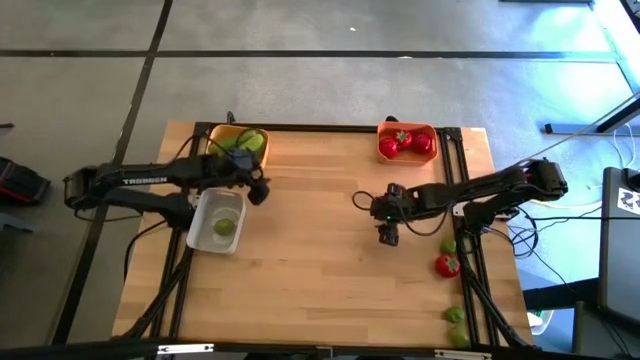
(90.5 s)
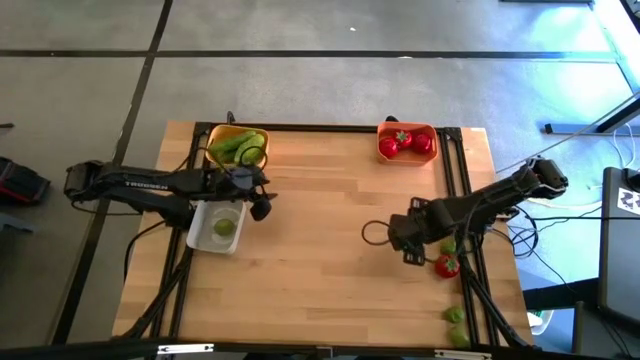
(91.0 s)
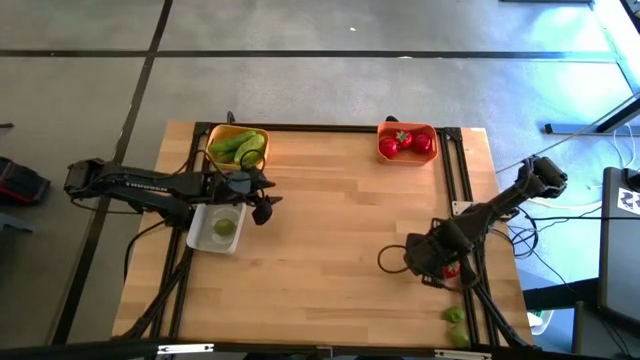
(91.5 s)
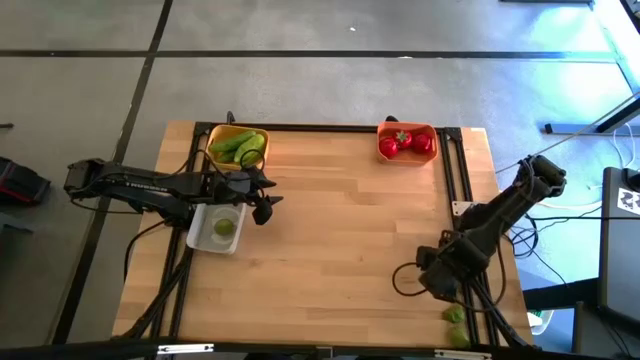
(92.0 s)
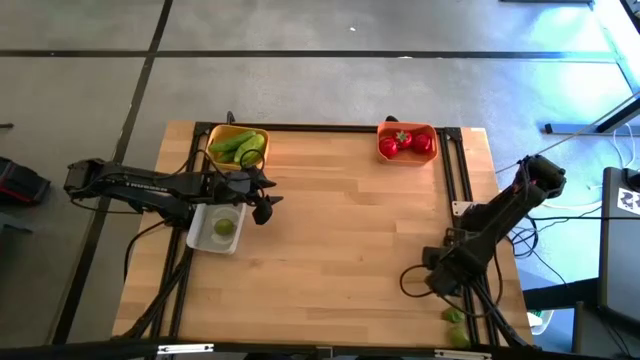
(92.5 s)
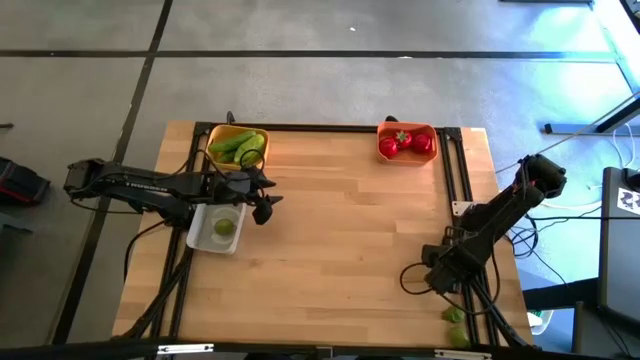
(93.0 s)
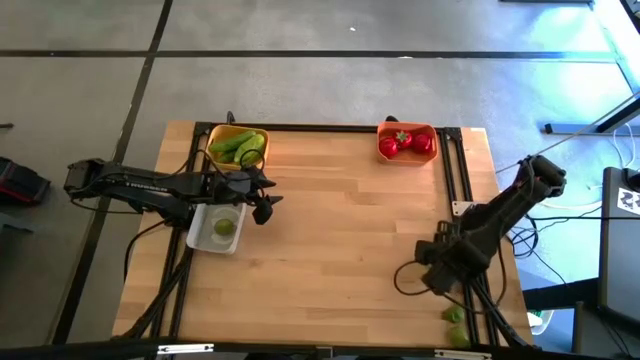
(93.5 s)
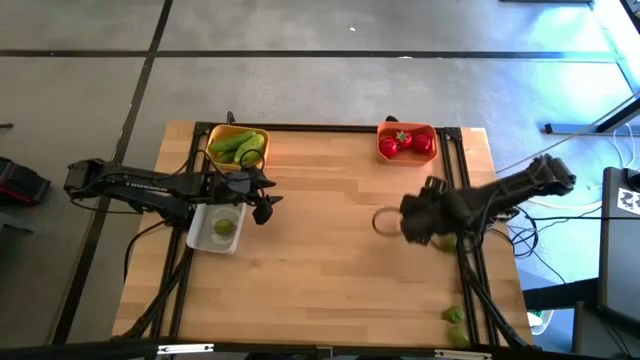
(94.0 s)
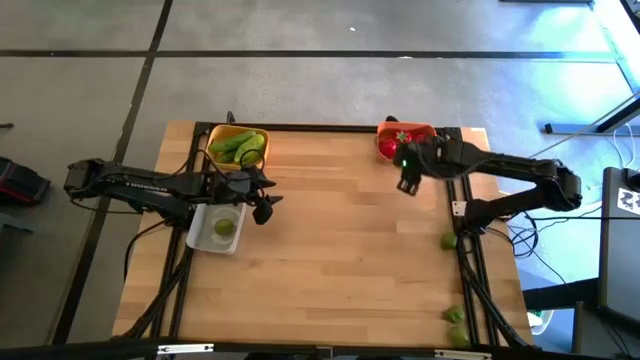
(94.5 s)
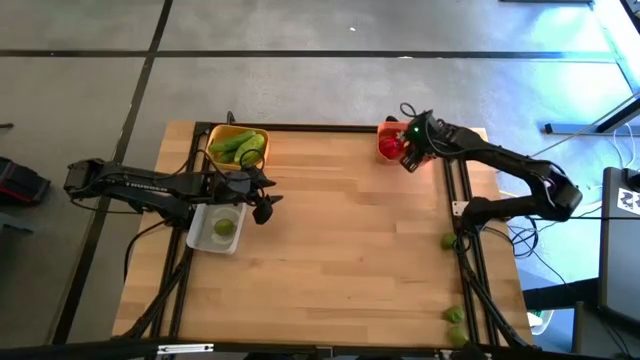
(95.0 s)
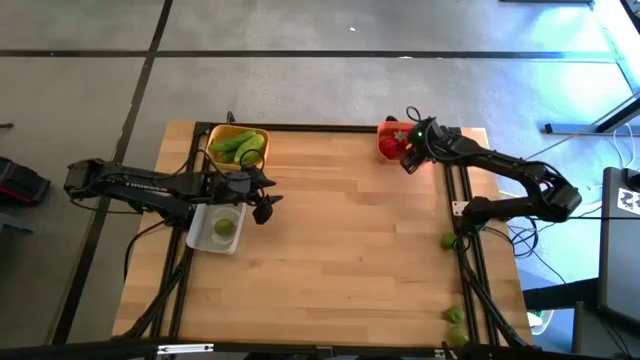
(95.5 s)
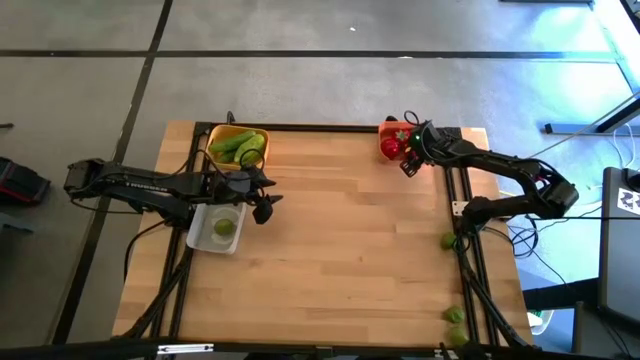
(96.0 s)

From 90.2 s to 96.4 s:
Task: Sort produce into baskets
Put the red tomato into the orange bin

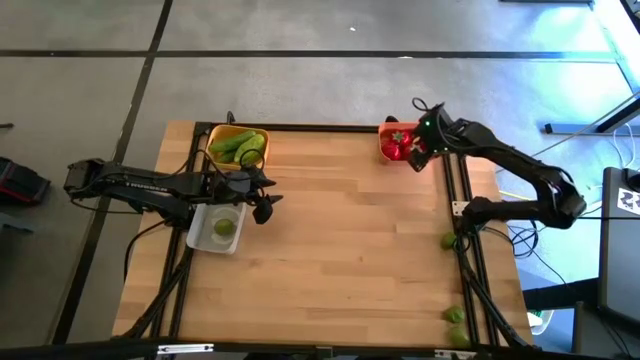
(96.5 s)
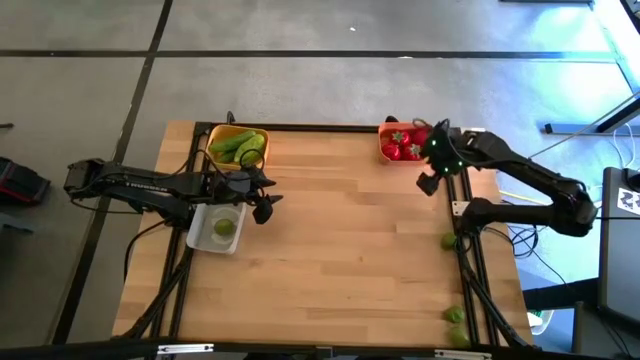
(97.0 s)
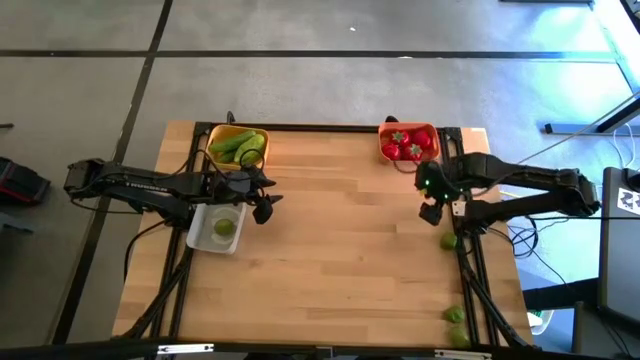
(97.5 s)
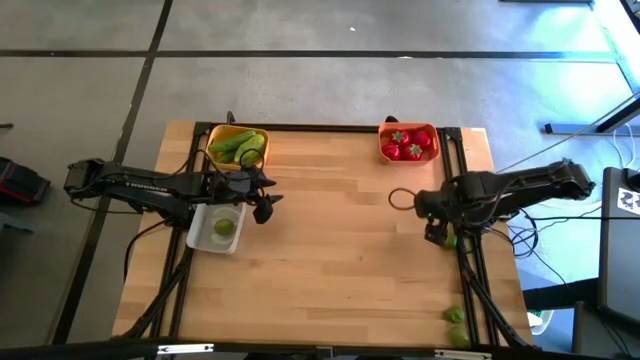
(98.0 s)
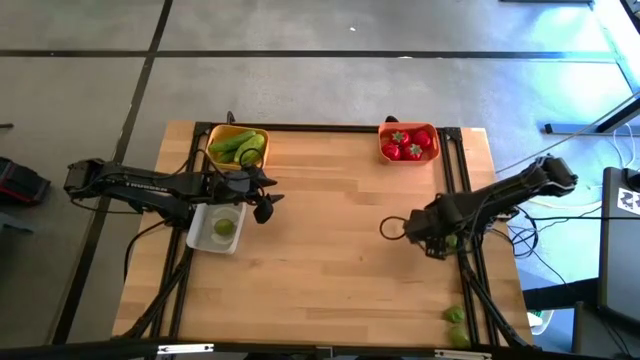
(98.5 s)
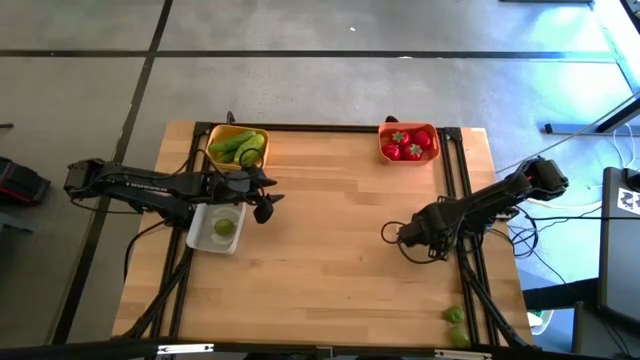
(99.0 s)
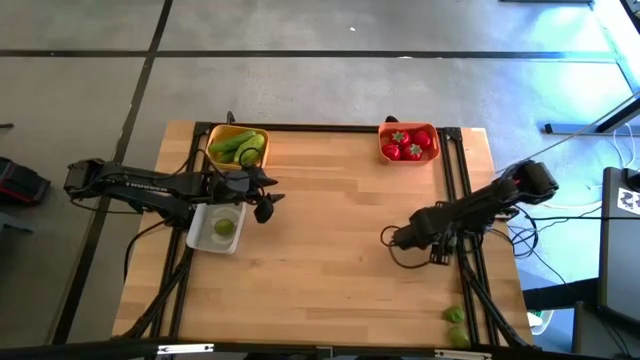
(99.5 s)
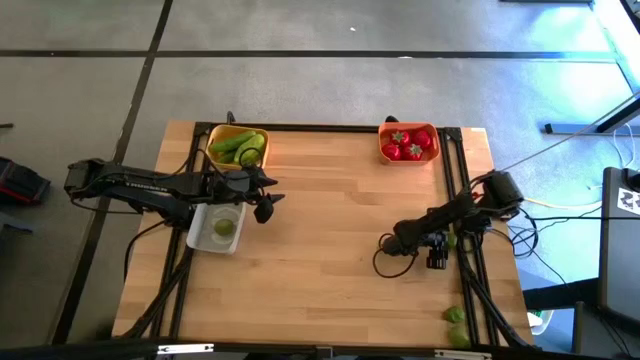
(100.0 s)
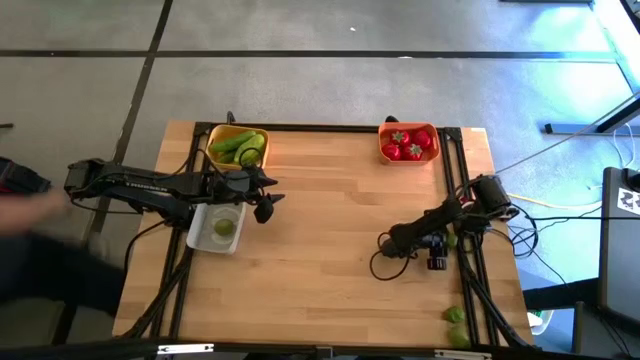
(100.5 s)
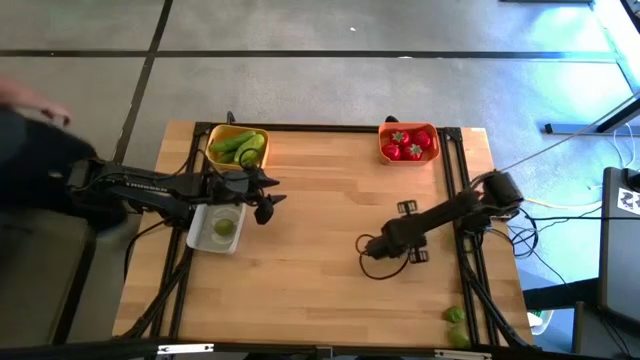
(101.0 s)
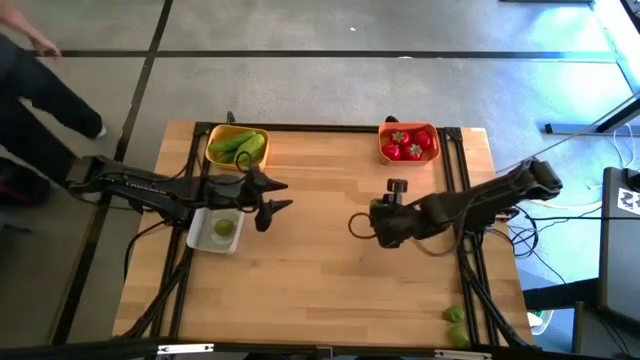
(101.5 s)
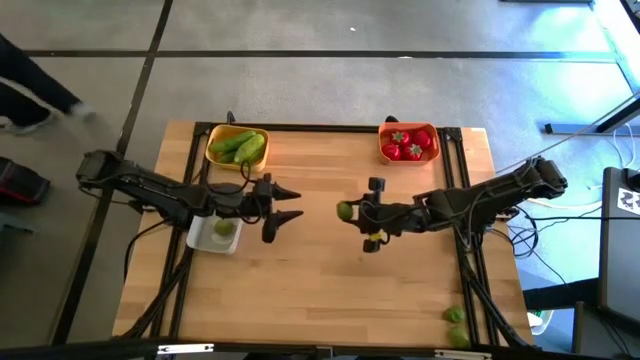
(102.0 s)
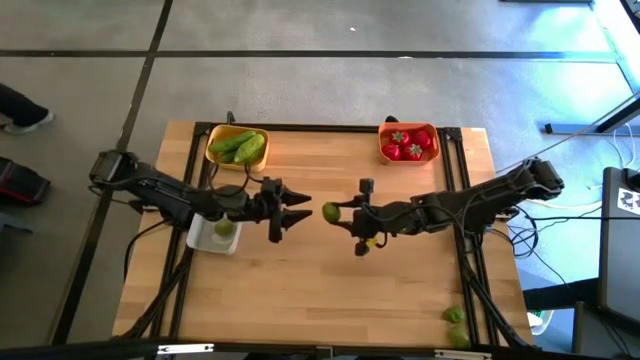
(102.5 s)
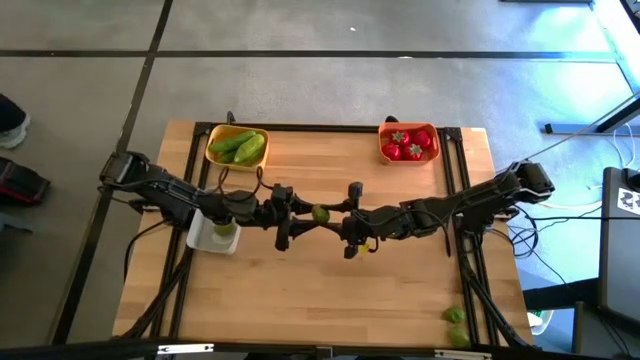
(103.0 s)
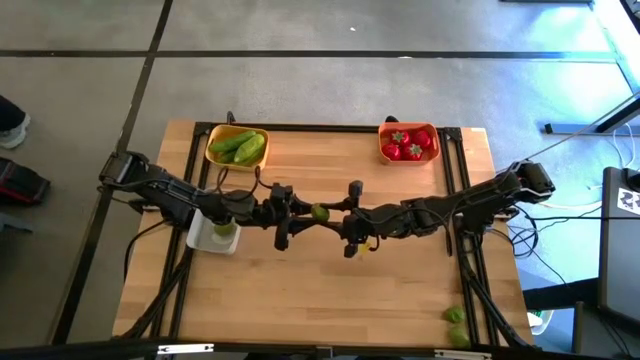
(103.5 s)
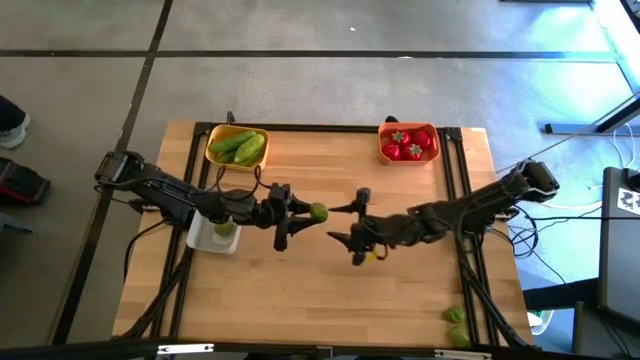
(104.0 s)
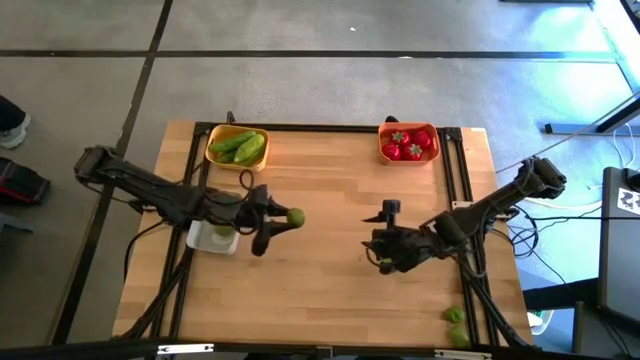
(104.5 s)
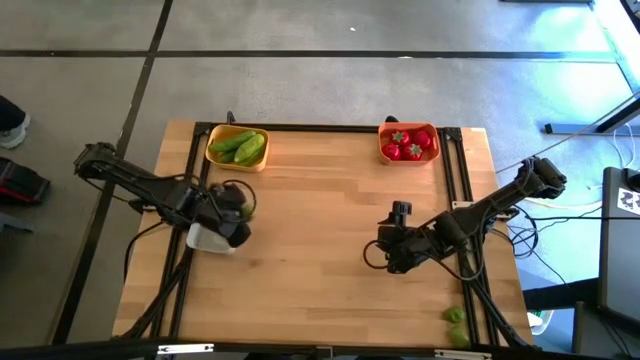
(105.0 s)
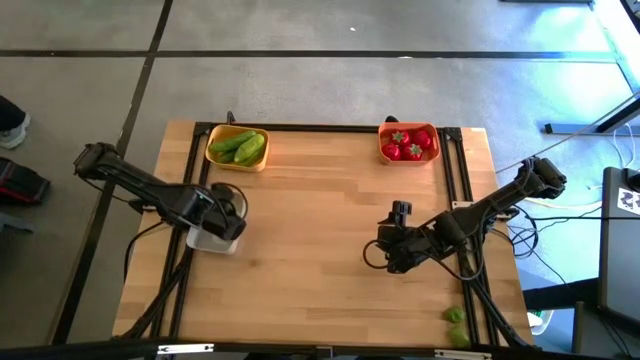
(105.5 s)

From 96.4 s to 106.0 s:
Put the top green lime into the white bin

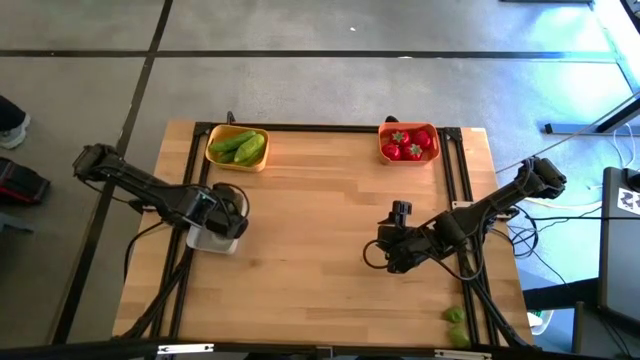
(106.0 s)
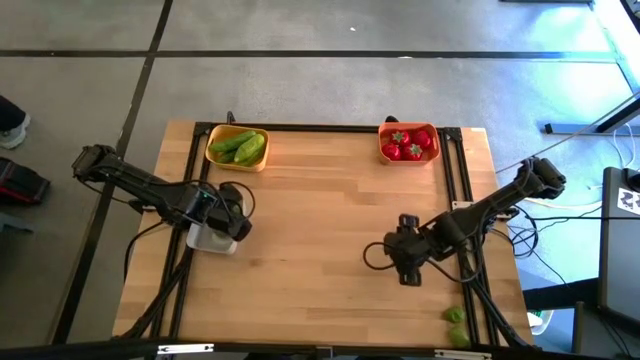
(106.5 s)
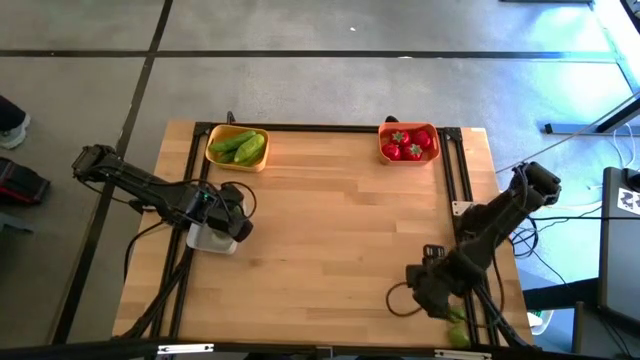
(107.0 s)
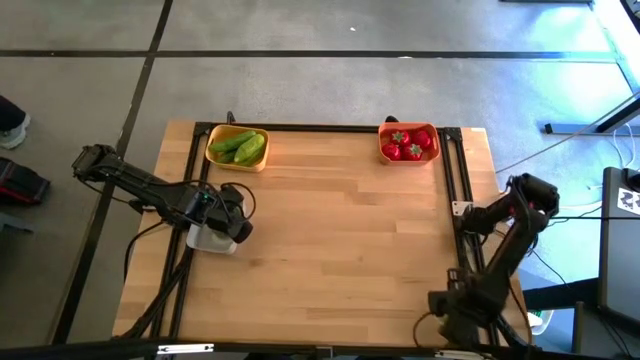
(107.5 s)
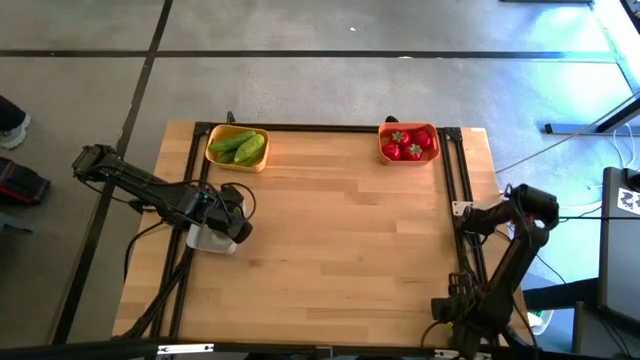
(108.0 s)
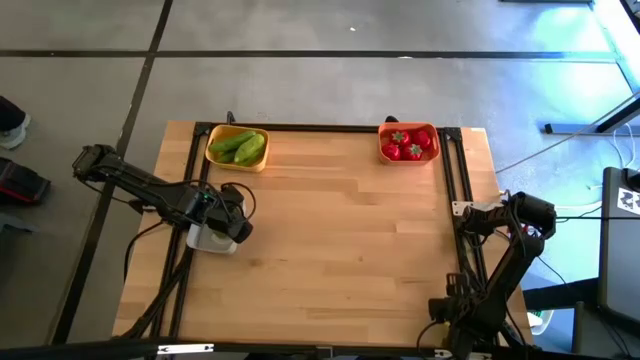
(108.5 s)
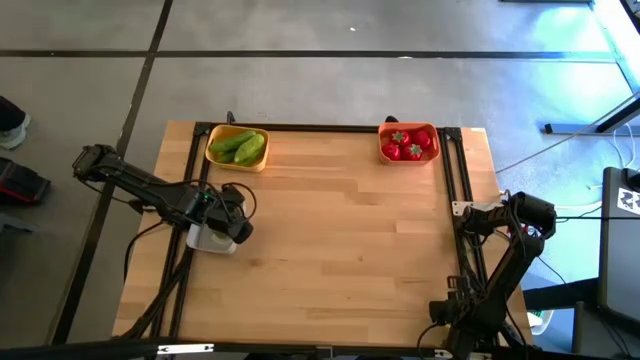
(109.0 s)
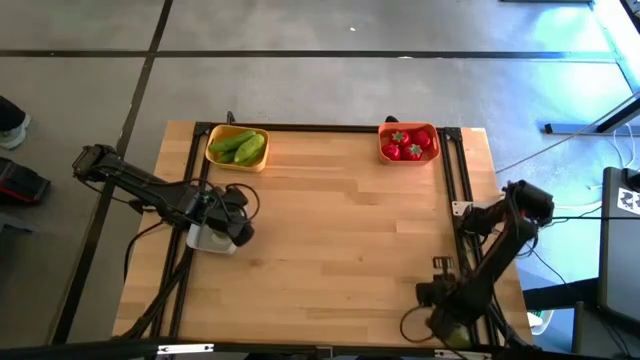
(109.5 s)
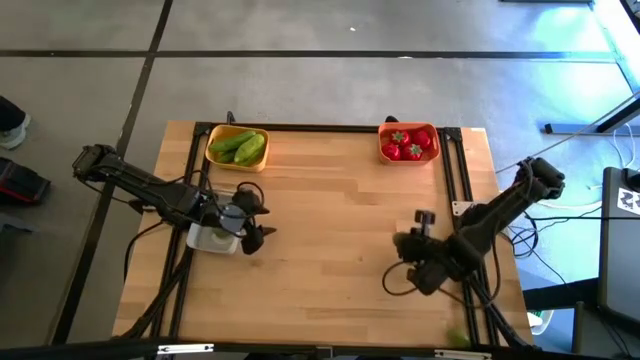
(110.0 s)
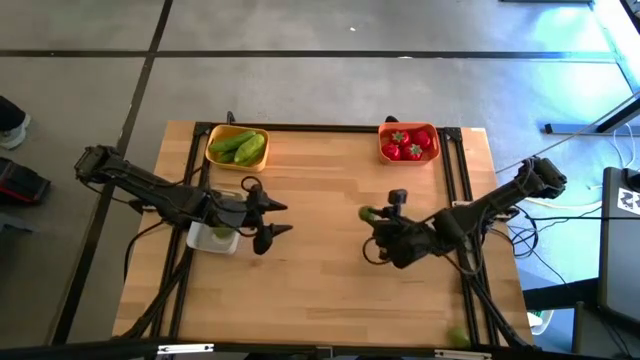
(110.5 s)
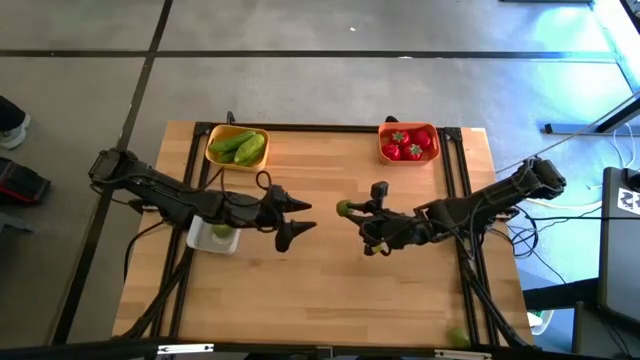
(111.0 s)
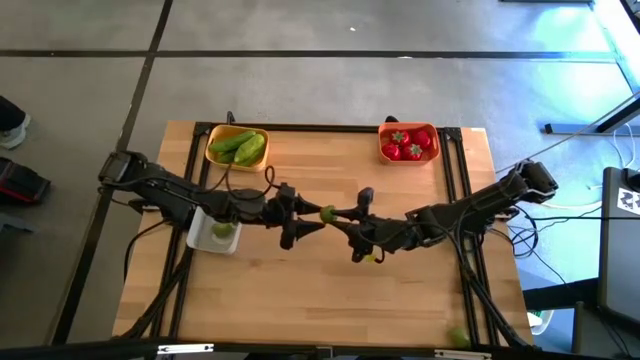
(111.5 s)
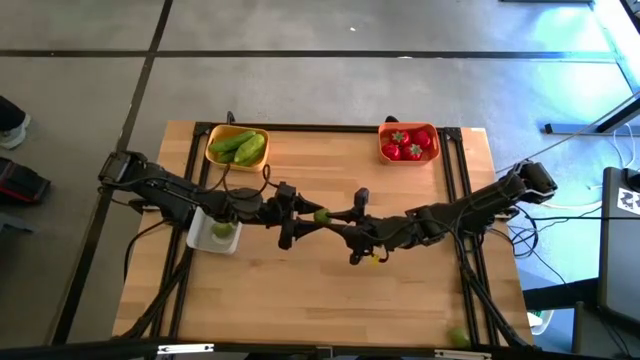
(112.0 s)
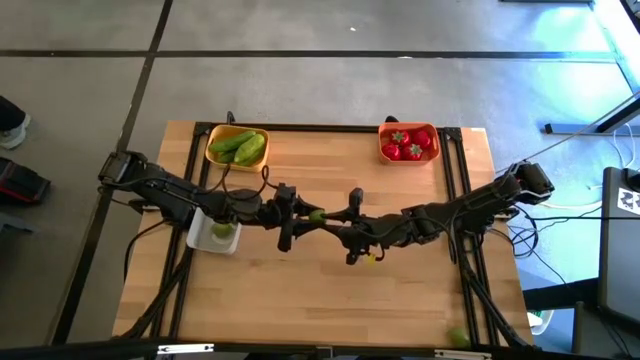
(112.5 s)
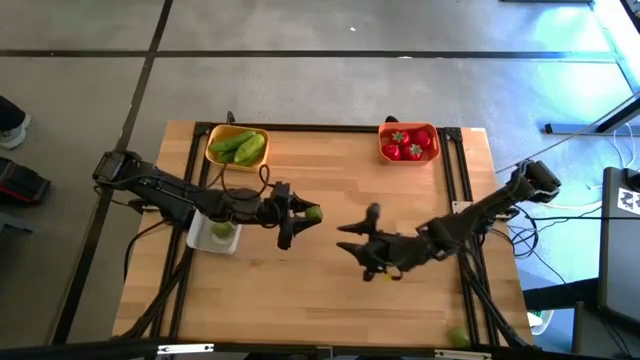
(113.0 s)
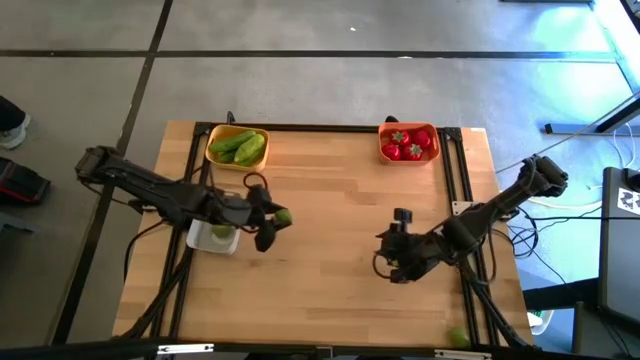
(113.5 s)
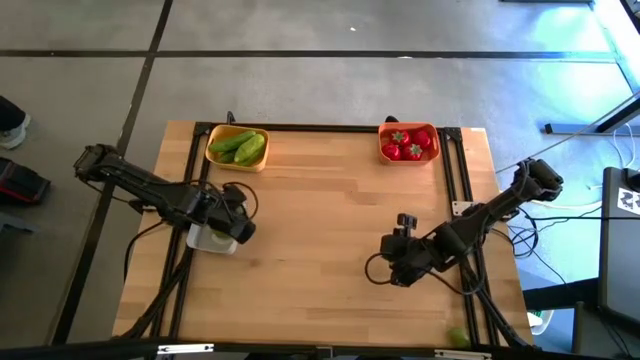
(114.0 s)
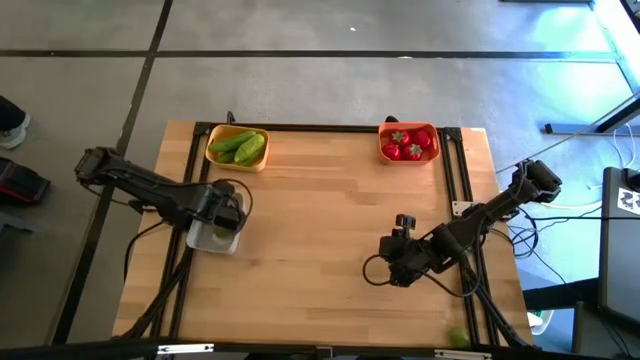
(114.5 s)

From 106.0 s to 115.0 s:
Put the top green lime into the white bin
